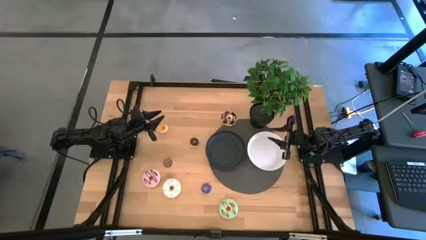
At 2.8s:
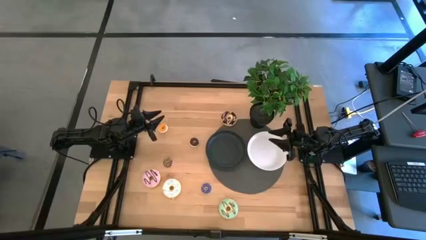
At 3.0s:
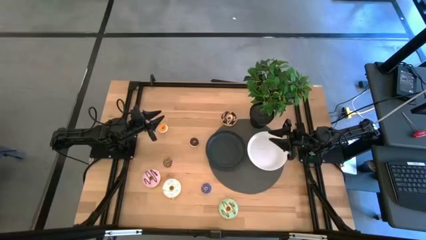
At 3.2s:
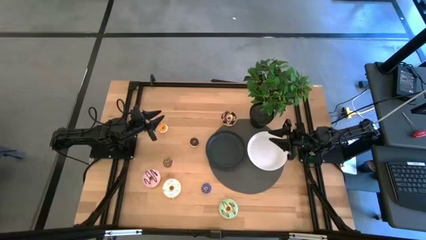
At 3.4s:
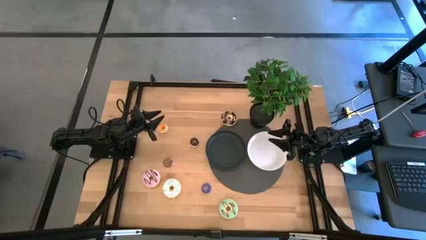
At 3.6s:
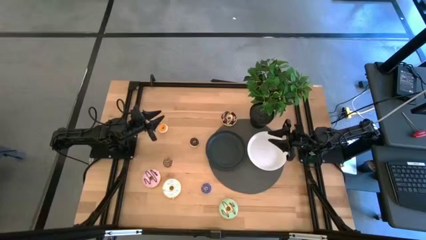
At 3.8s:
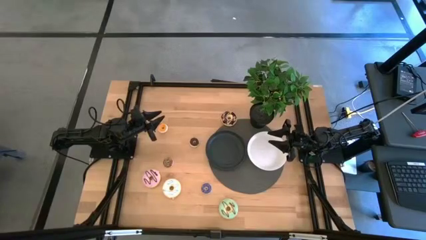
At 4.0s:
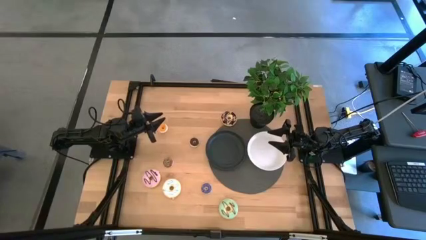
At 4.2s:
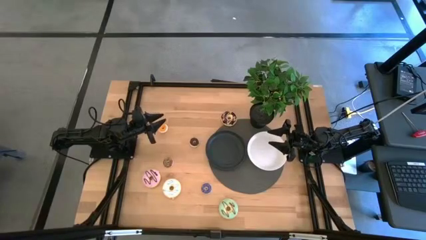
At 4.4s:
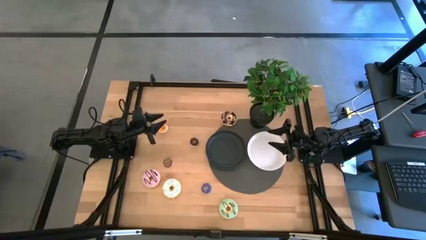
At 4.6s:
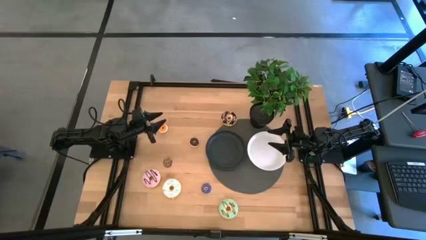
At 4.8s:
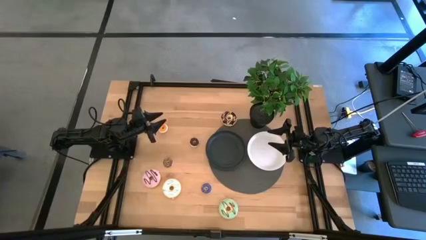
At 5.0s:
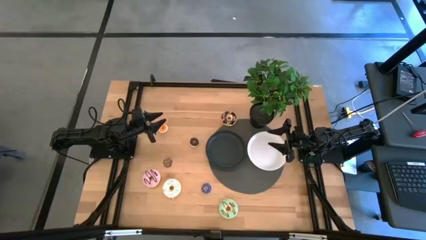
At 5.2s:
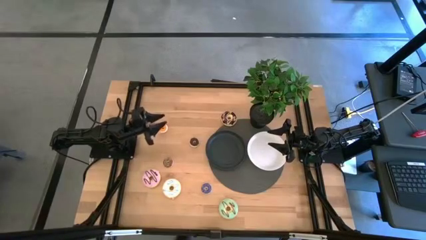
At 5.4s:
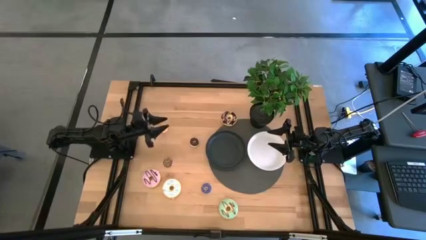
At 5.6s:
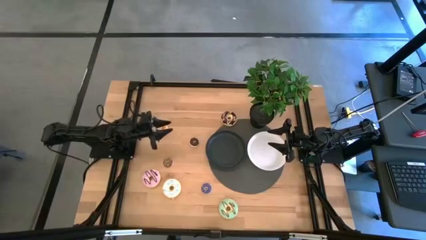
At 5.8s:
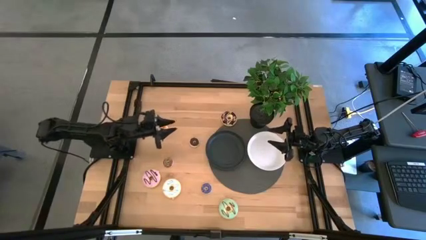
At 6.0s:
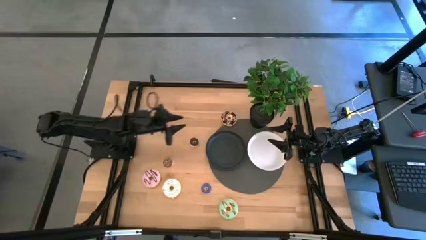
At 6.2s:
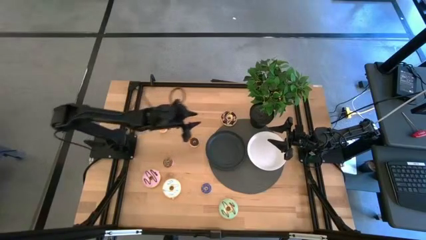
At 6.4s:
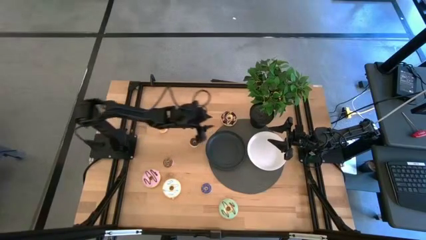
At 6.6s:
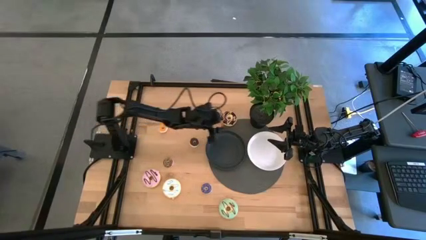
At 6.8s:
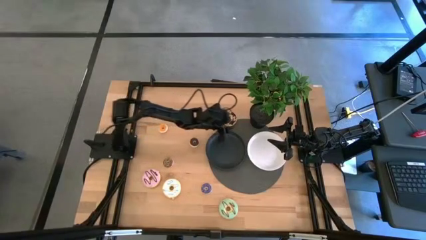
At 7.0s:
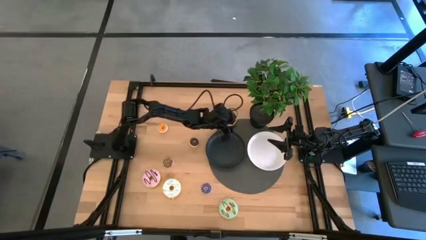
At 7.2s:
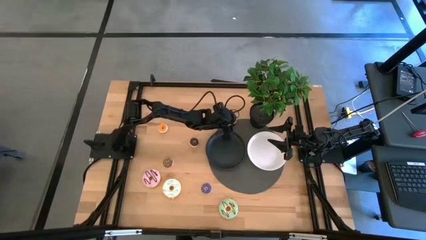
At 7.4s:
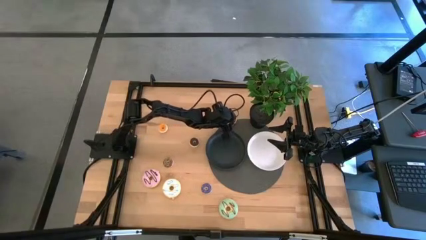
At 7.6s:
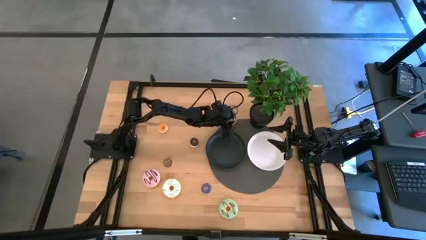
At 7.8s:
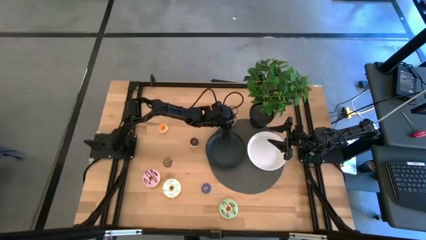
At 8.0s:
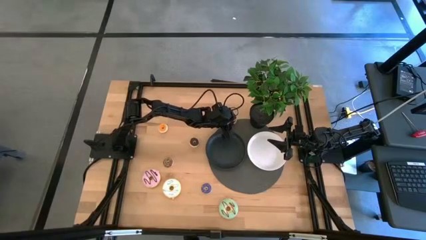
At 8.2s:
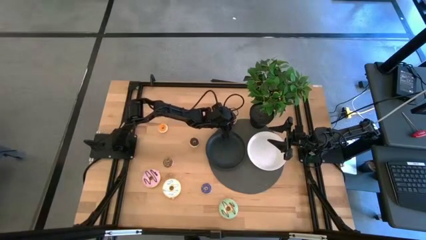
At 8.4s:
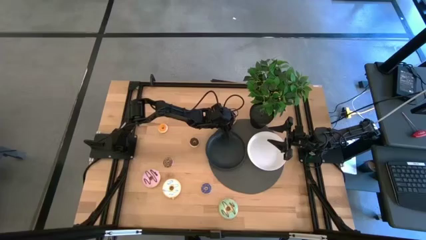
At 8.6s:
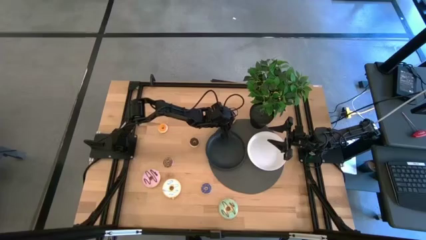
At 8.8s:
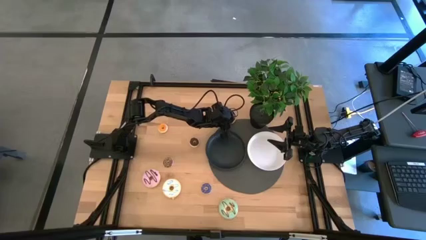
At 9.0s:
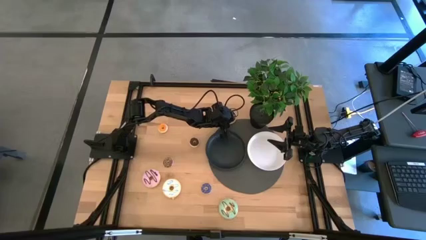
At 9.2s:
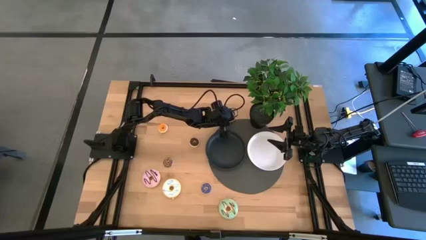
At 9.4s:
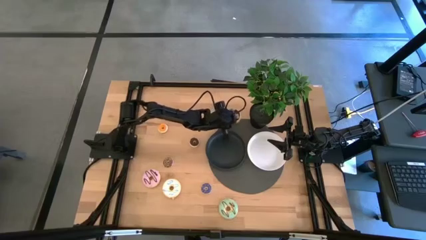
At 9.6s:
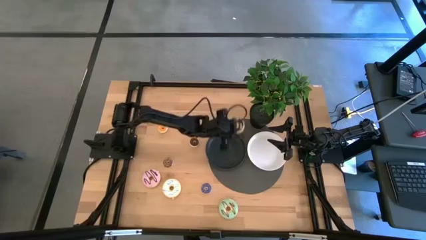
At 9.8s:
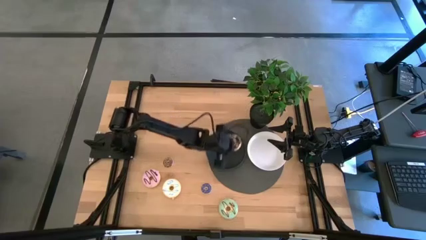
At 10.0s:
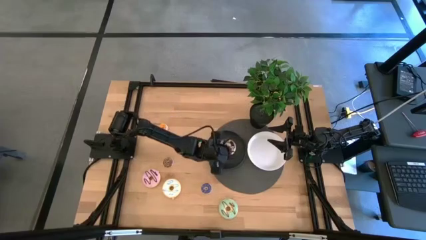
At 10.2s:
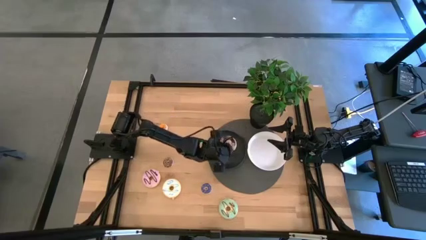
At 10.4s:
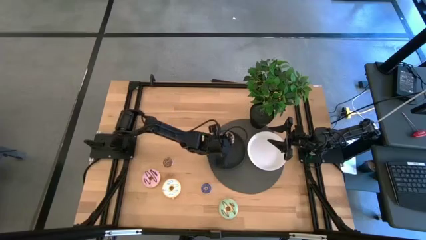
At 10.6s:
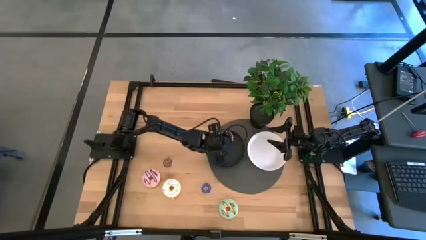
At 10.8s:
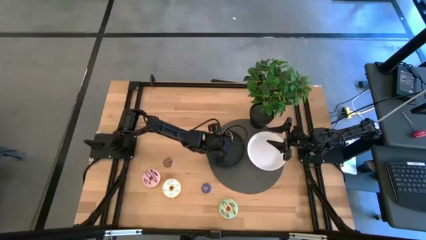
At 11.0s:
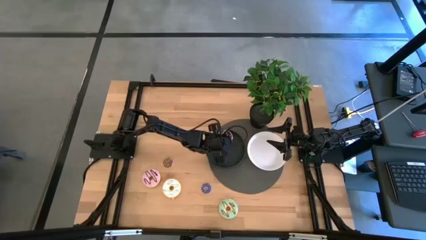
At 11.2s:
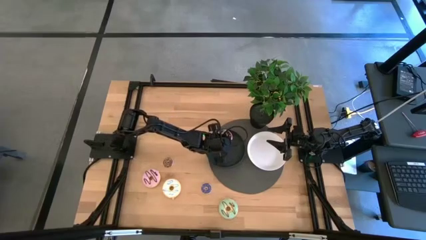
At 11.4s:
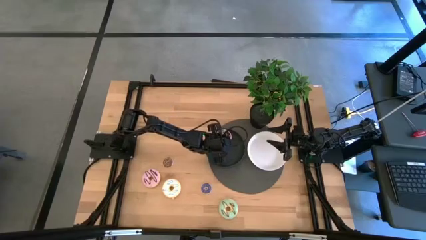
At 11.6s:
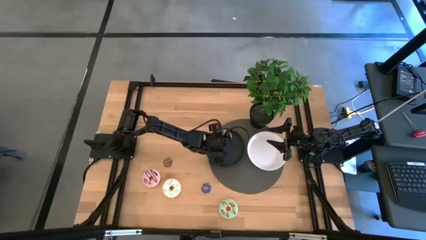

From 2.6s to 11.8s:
Task: Pick & Place donuts
Put the large black donut on the black plate

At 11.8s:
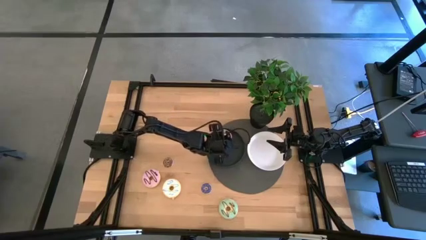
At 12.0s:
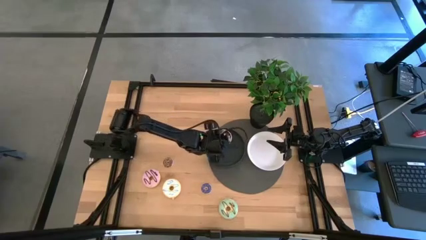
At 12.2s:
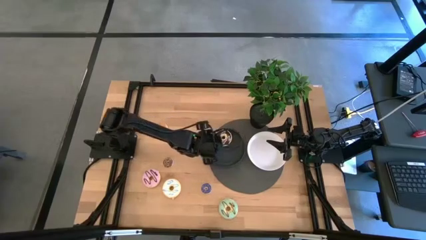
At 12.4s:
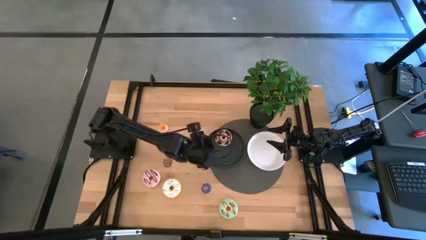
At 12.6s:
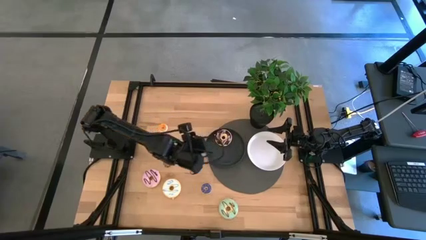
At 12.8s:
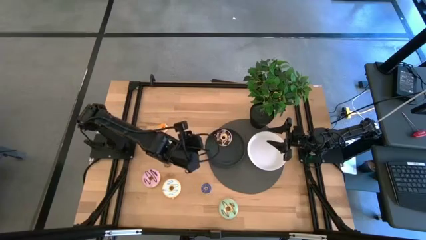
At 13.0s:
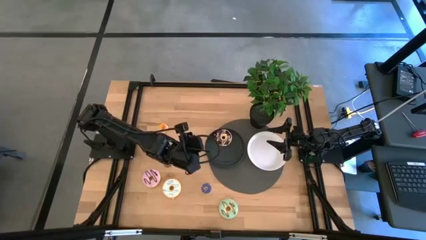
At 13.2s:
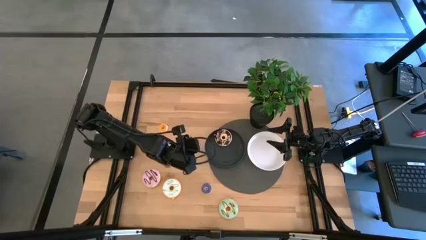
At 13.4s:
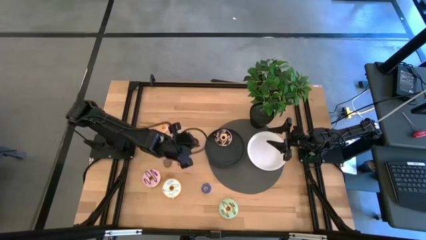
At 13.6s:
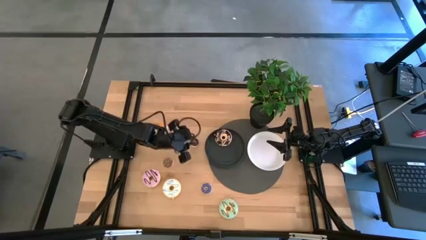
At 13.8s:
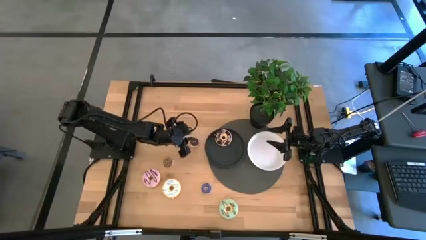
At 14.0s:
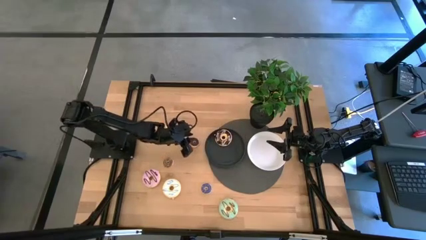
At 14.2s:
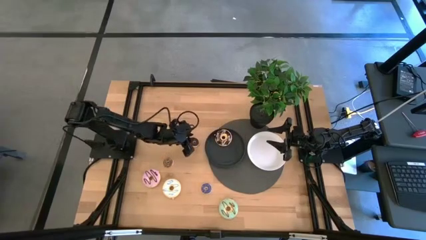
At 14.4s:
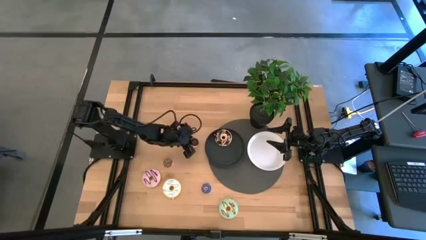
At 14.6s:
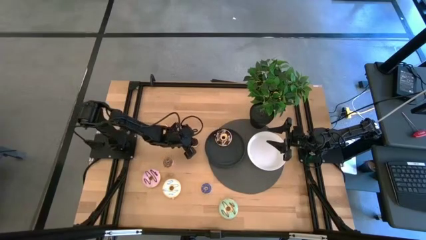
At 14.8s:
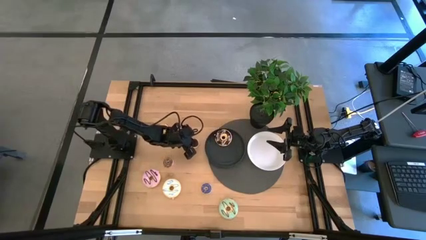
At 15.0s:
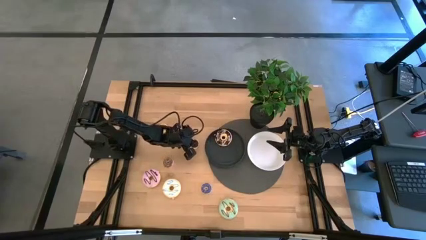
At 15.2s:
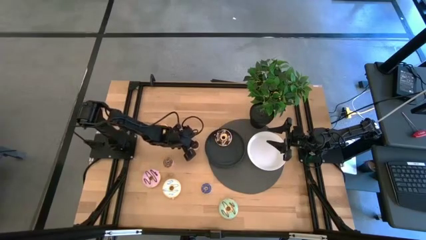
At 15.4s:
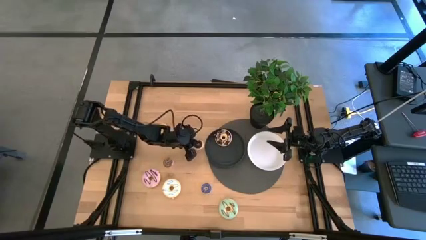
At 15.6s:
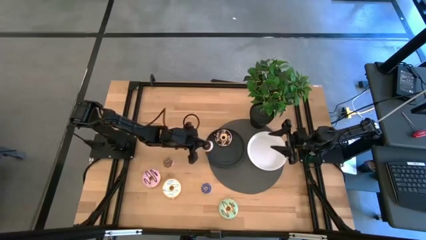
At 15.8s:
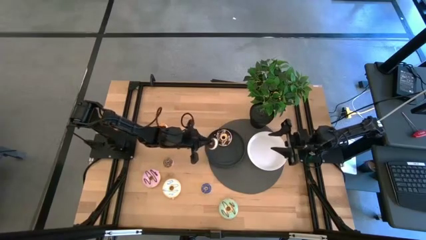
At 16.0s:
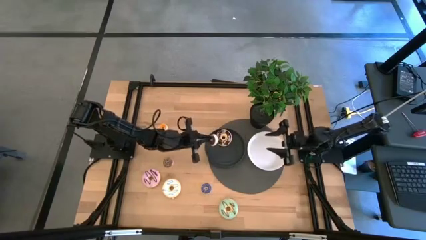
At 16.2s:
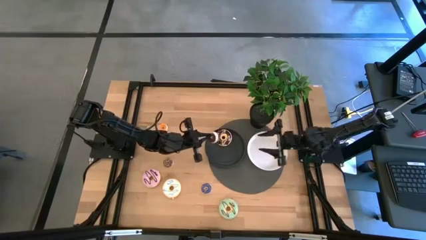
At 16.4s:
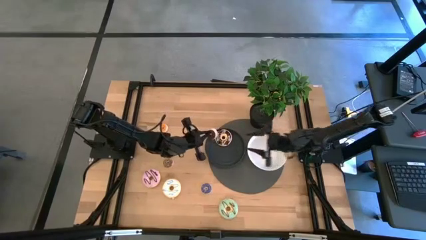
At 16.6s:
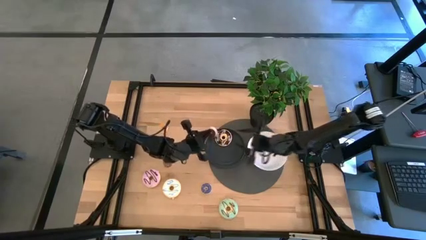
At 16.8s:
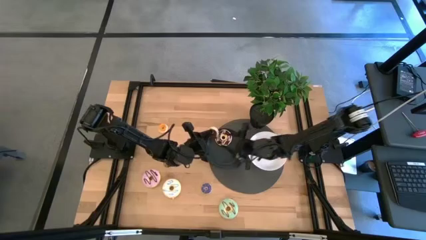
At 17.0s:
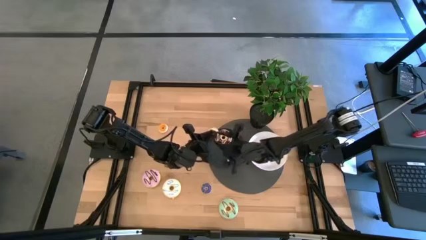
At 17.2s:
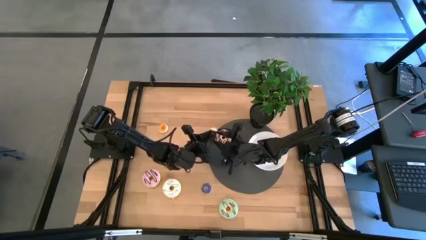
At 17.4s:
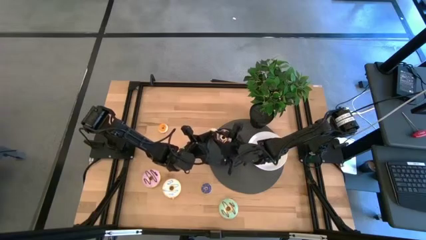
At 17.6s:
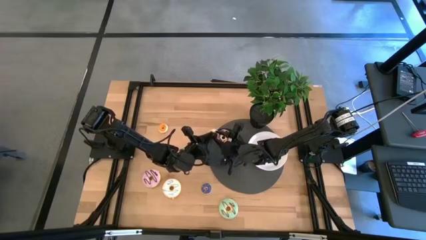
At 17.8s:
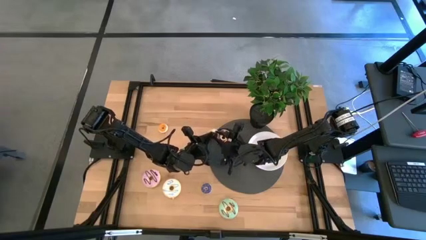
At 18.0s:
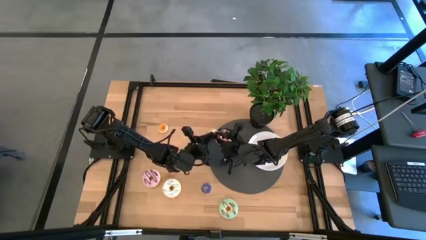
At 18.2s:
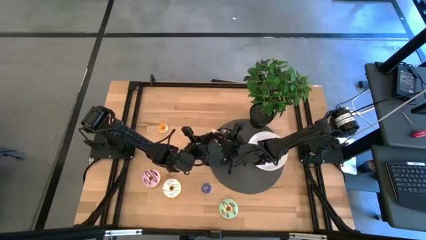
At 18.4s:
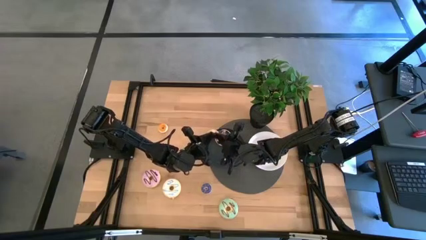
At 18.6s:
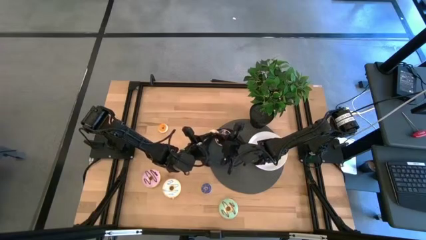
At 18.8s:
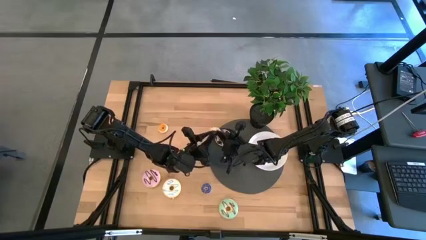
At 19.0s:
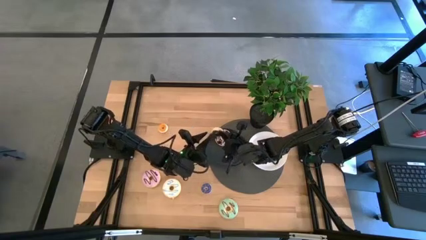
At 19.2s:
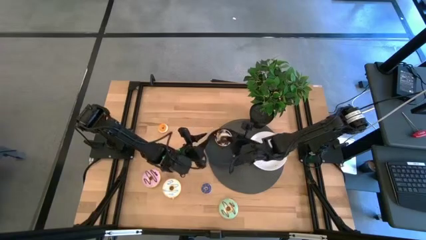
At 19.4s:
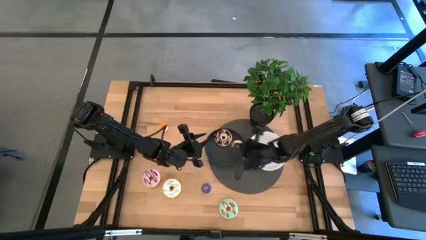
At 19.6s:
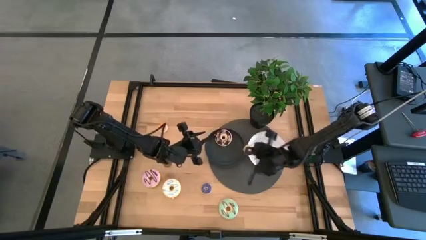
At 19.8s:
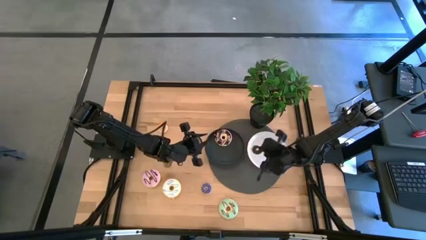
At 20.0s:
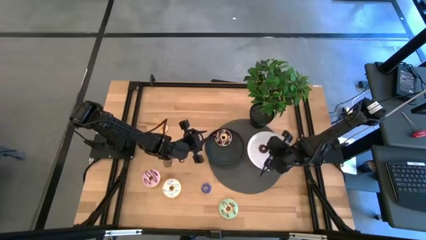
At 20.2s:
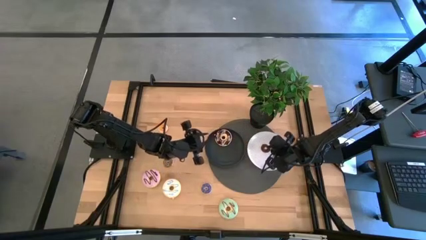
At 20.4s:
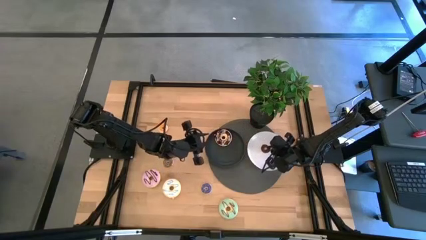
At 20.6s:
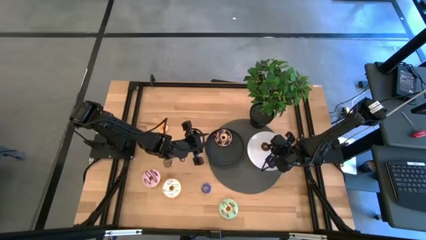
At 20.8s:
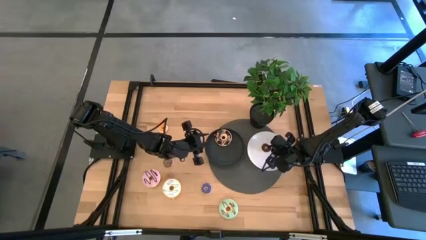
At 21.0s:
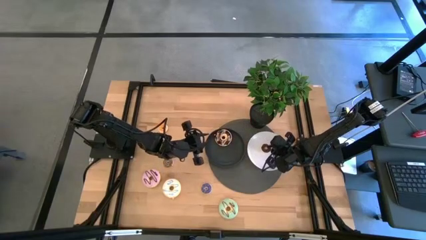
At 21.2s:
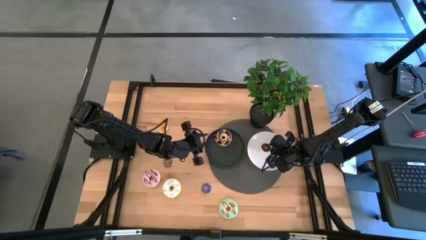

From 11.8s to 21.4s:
Put the small brown donut on the white plate
